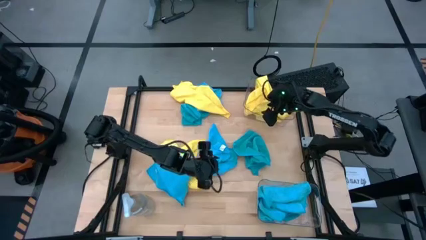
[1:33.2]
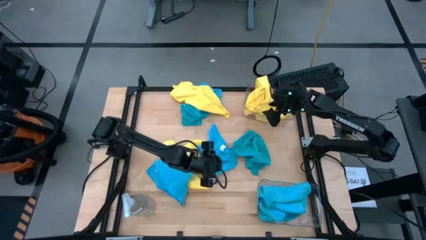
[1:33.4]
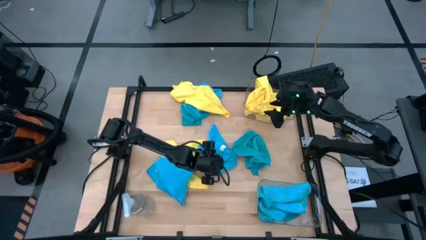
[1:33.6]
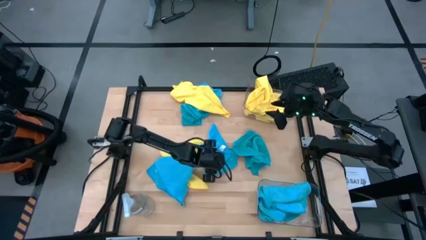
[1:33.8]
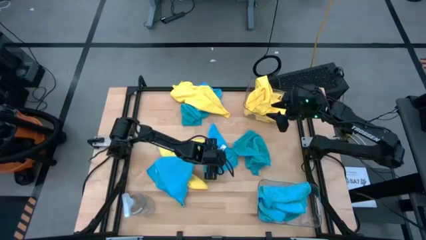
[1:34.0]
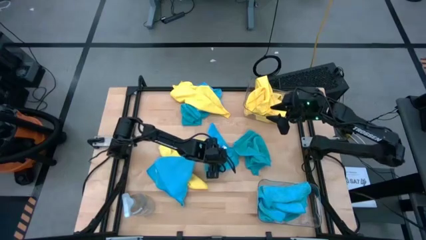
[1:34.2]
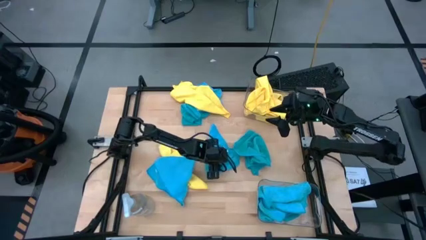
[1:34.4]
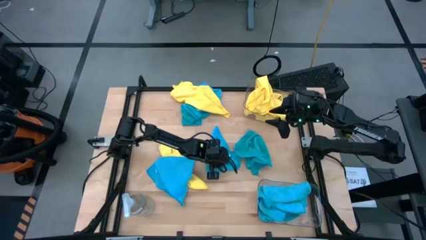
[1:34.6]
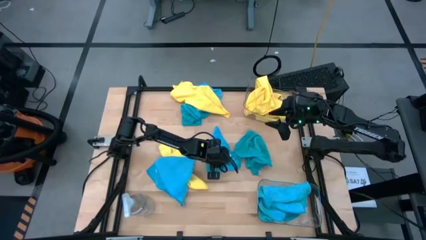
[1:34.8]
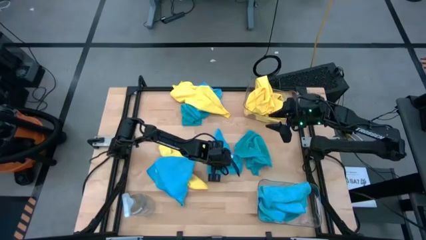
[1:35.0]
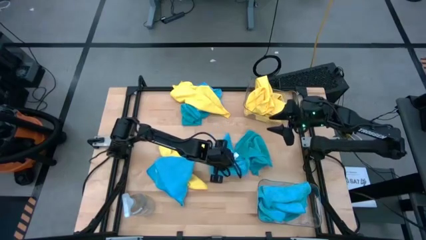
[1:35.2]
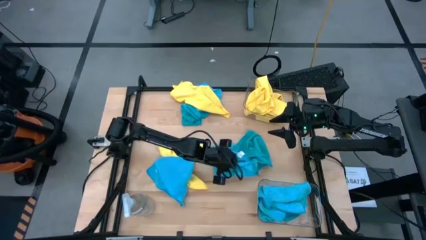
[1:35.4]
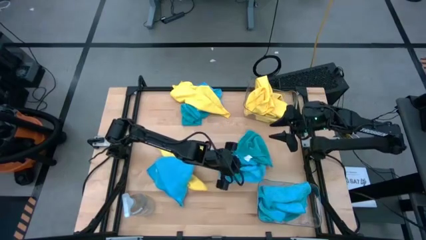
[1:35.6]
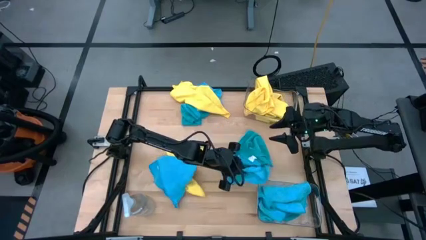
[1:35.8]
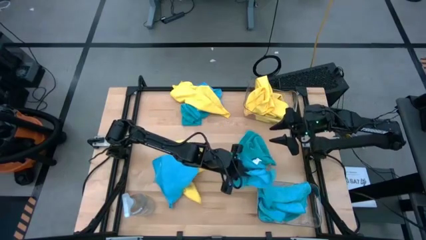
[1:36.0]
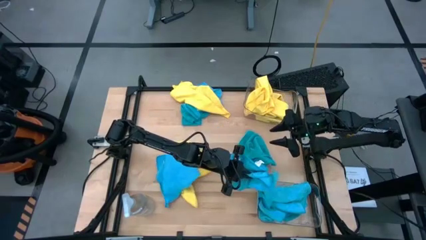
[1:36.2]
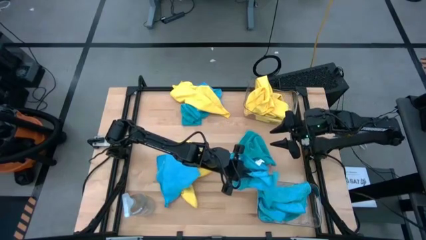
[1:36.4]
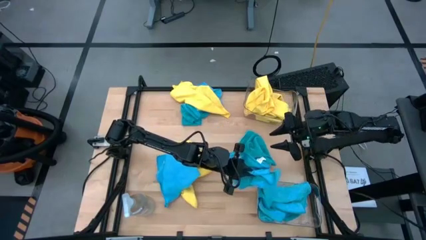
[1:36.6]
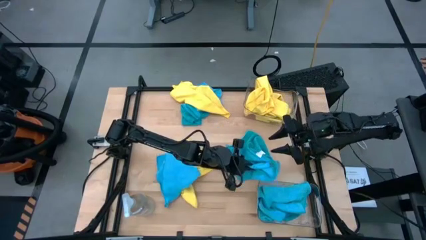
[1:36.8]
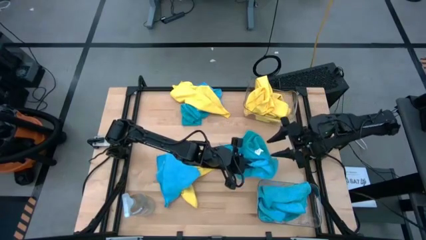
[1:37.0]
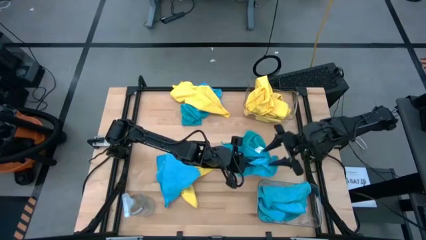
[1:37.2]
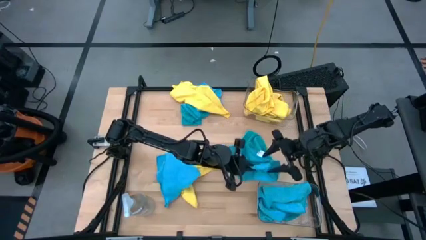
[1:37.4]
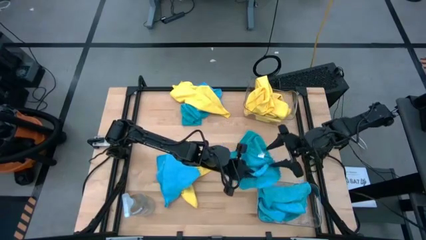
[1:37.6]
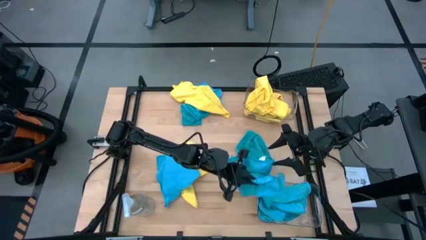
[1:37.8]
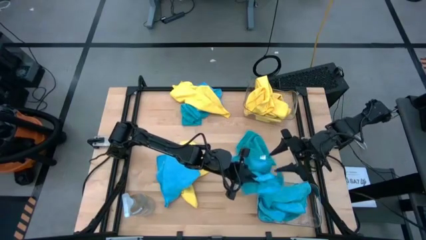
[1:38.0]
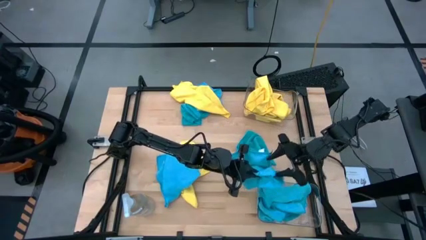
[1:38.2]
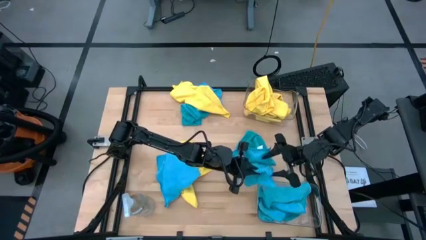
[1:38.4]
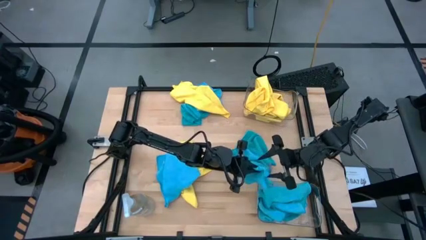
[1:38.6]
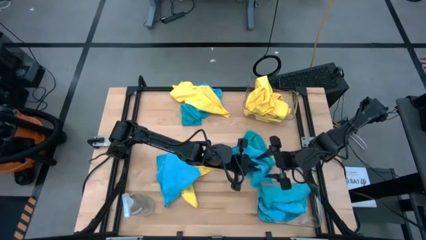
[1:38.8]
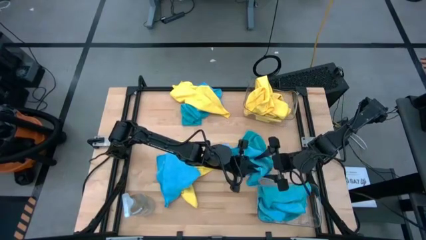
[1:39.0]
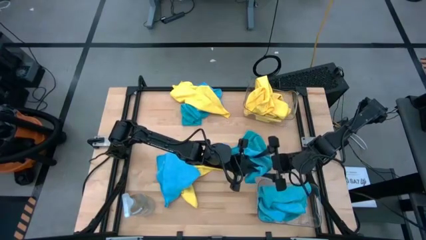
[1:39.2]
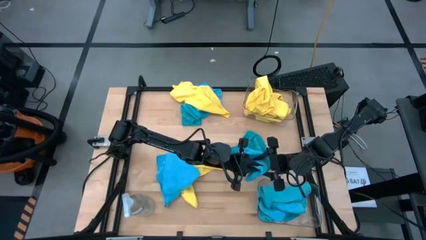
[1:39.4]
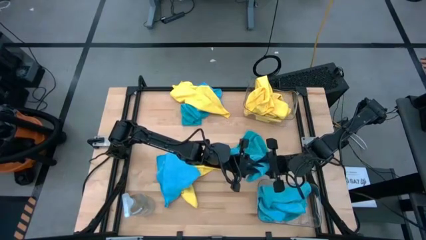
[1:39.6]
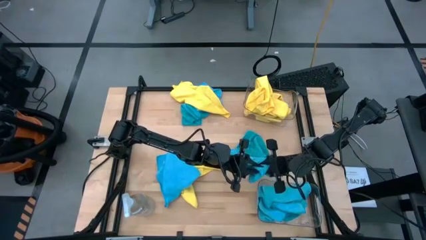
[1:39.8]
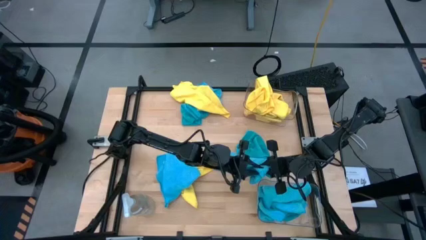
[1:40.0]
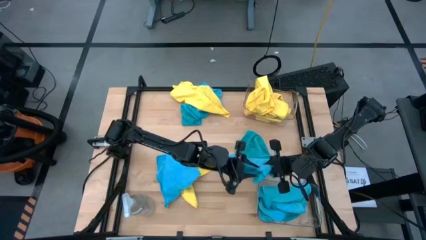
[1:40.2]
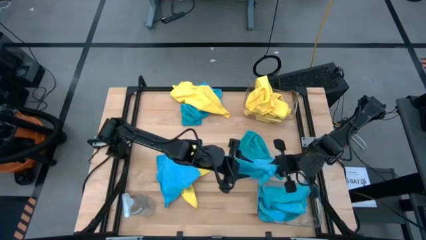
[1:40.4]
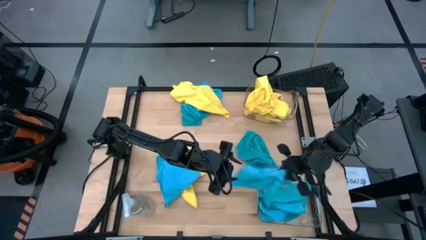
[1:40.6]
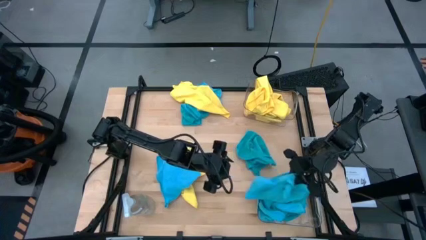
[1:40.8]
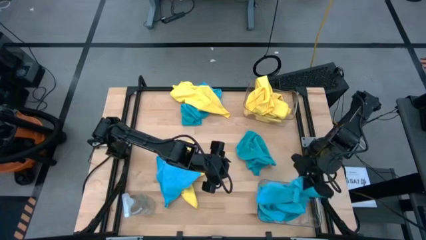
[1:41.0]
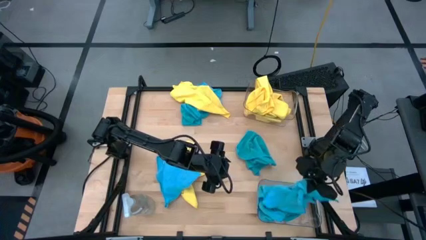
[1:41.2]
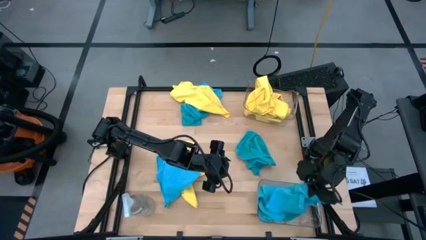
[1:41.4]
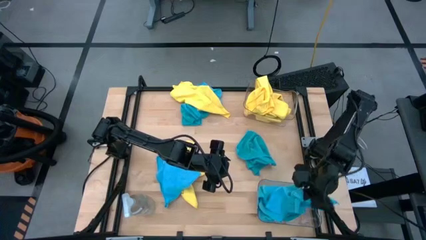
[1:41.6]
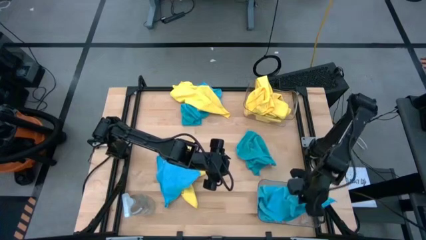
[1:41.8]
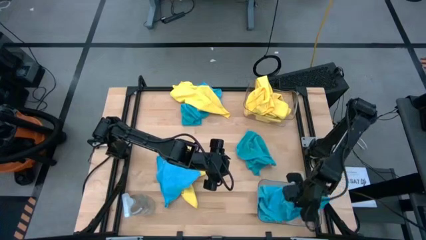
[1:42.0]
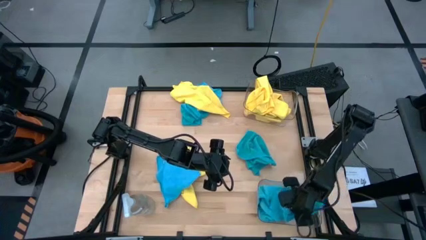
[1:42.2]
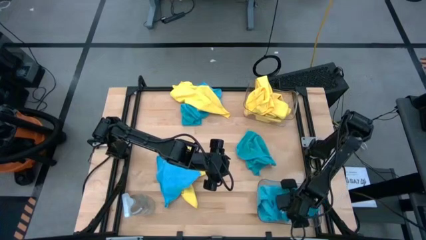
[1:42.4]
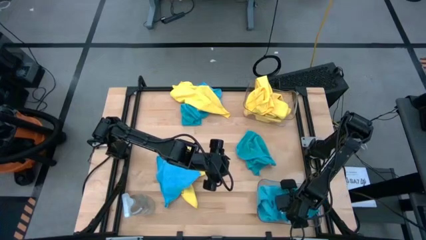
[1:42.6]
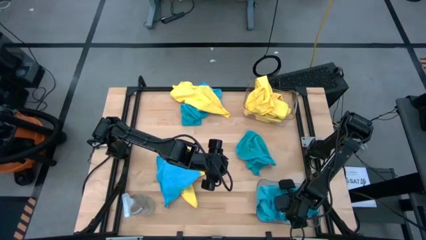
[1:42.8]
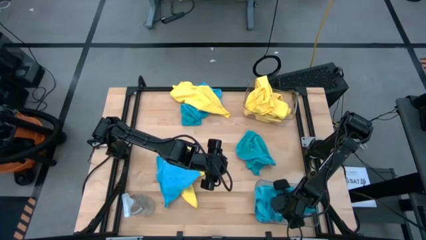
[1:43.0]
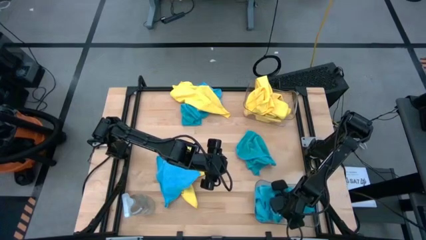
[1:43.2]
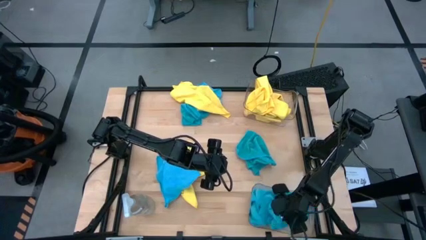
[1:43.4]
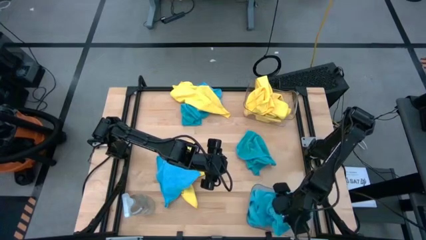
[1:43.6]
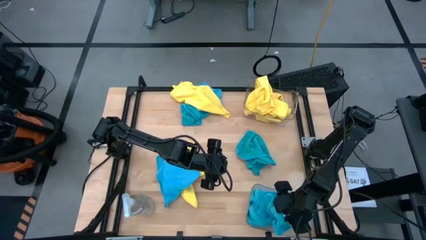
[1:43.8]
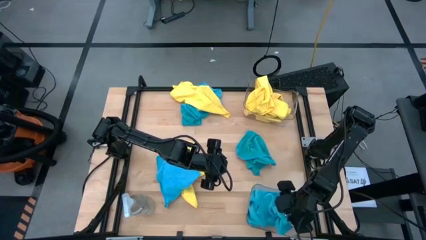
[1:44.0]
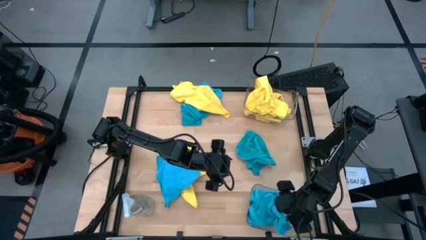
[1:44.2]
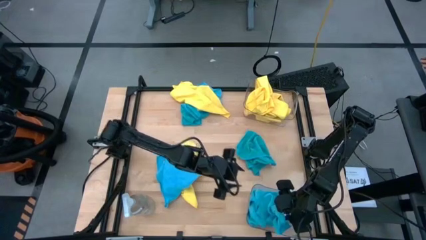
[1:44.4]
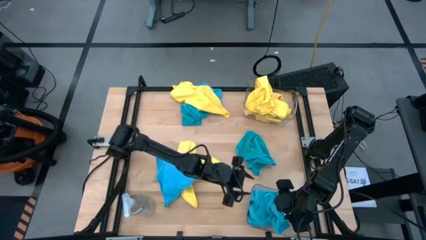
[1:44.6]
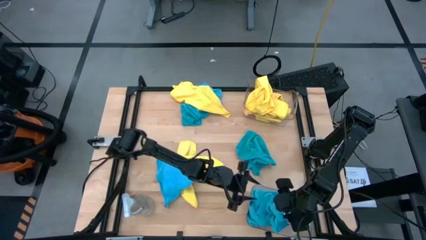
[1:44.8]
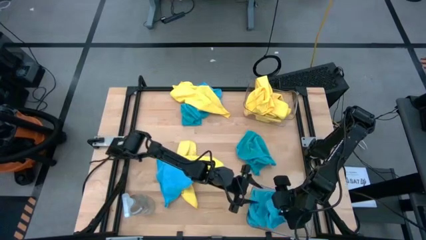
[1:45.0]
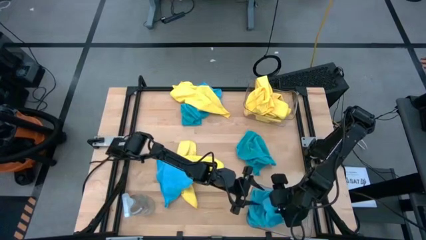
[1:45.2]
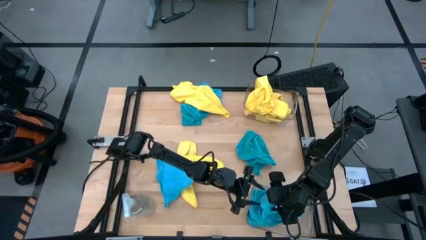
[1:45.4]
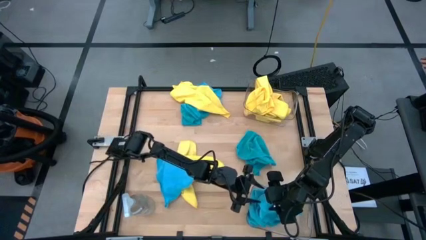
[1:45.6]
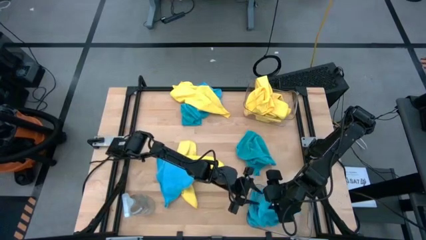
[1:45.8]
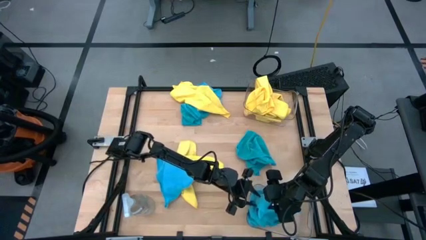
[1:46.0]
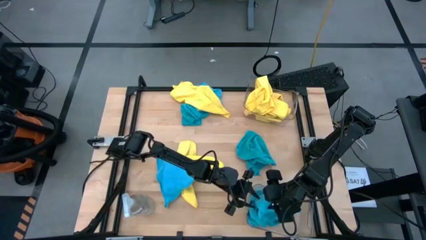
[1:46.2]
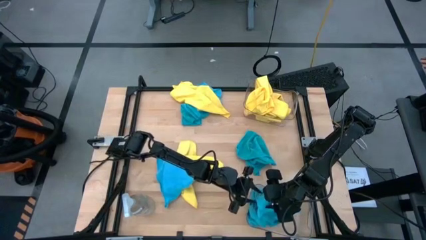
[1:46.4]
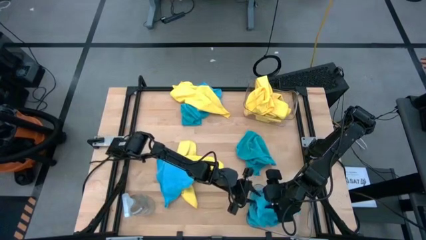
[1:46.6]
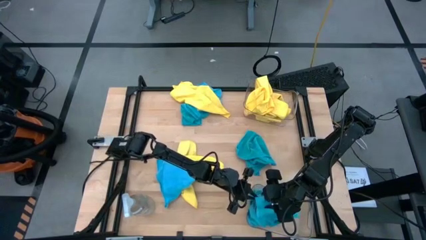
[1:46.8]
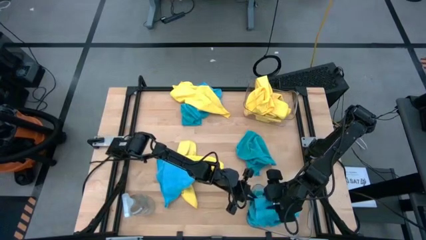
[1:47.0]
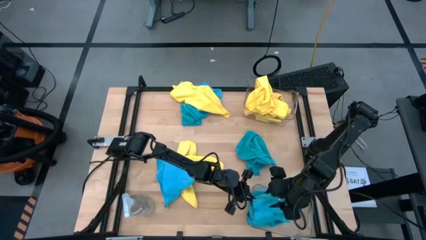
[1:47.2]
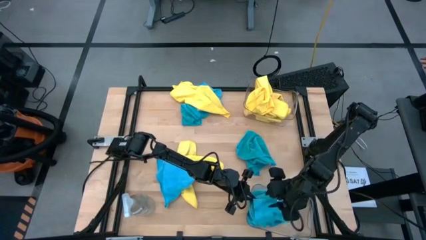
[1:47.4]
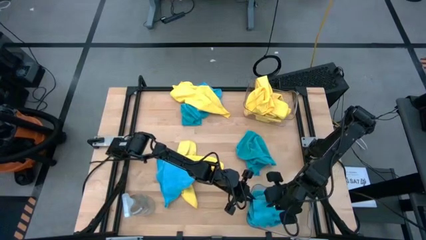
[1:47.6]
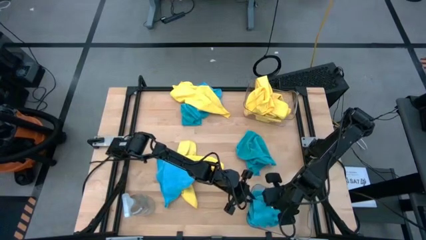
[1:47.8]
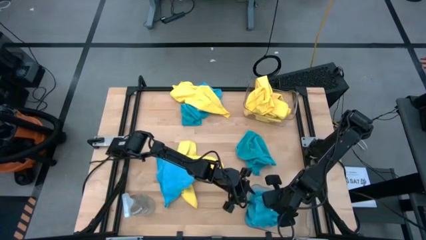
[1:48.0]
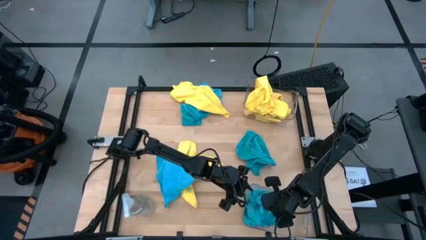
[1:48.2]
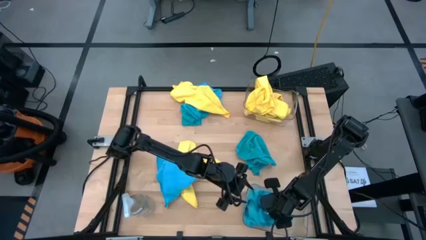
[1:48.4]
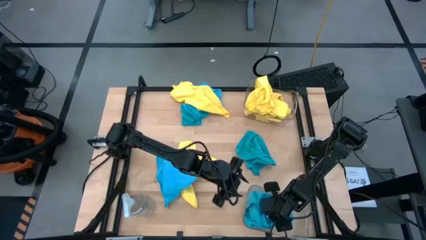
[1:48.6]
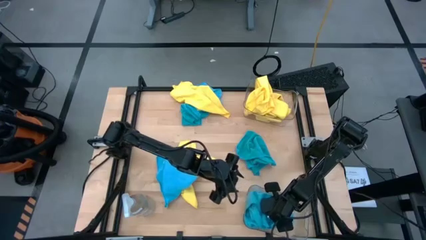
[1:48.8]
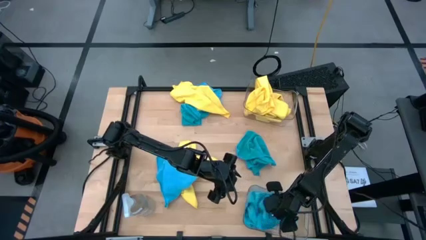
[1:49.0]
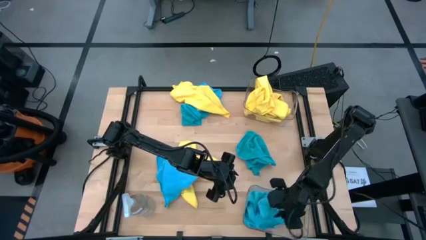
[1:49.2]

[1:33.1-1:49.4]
Task: Sort microfiber towel by color & place in baskets
Put the blue microfiber cloth into the bottom transparent bin
